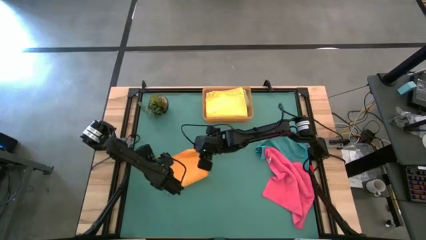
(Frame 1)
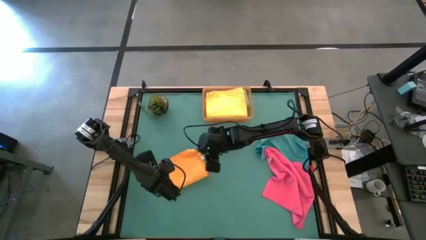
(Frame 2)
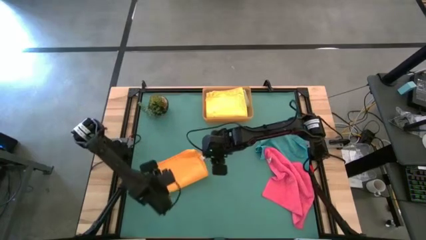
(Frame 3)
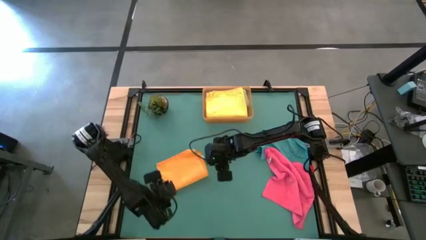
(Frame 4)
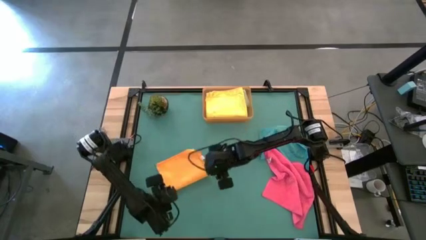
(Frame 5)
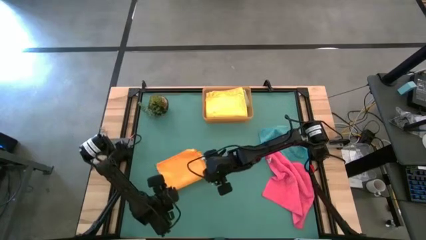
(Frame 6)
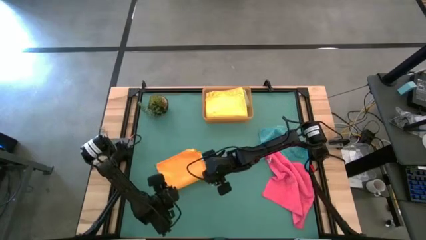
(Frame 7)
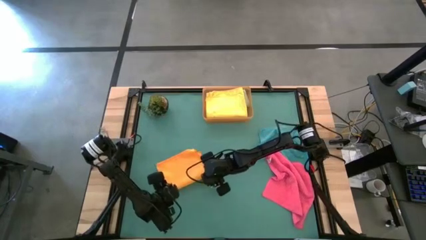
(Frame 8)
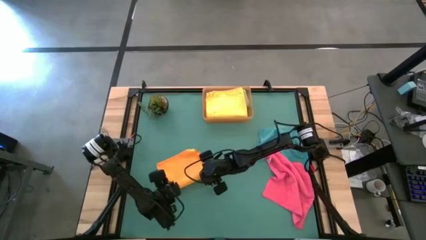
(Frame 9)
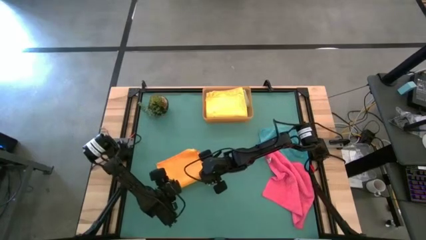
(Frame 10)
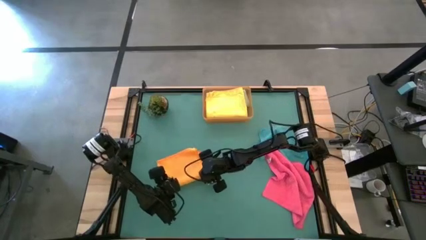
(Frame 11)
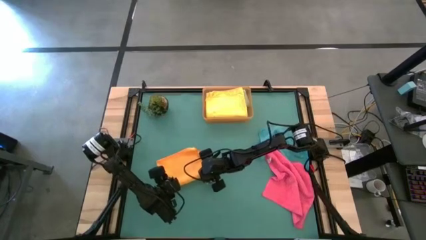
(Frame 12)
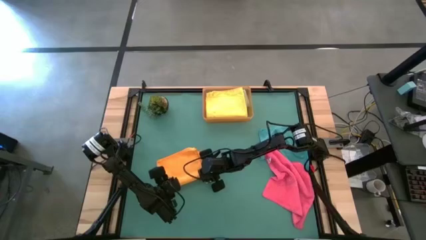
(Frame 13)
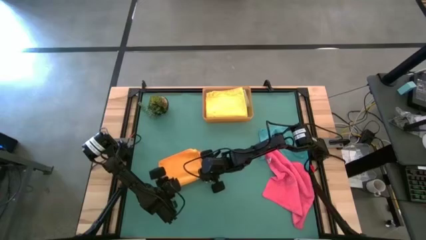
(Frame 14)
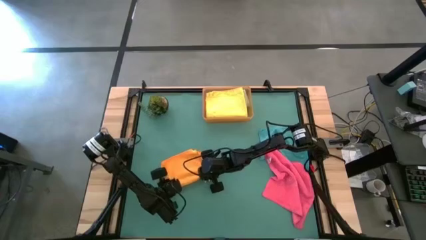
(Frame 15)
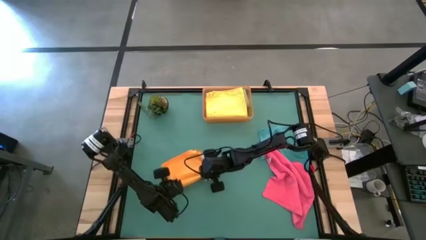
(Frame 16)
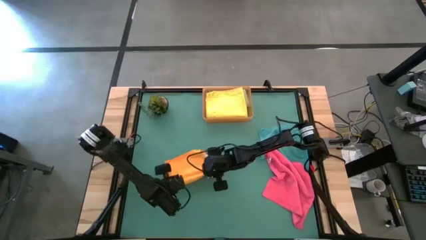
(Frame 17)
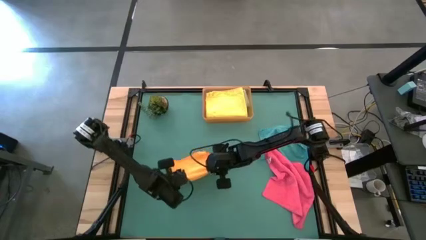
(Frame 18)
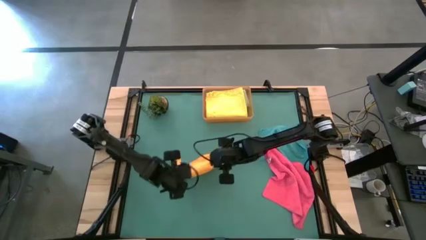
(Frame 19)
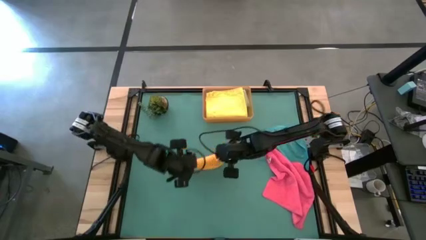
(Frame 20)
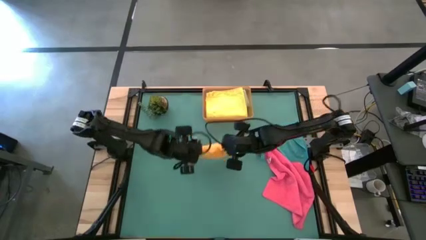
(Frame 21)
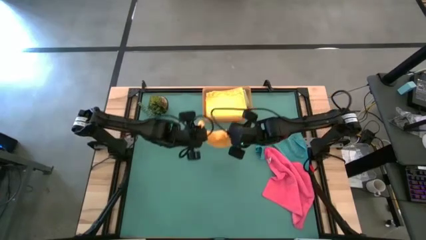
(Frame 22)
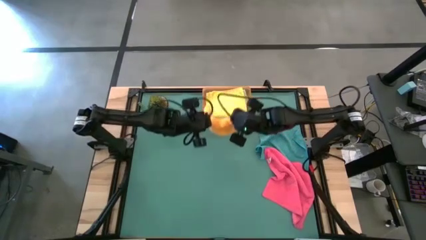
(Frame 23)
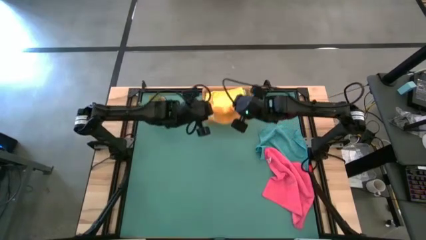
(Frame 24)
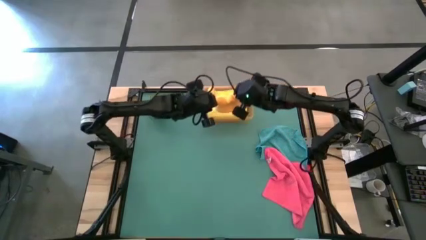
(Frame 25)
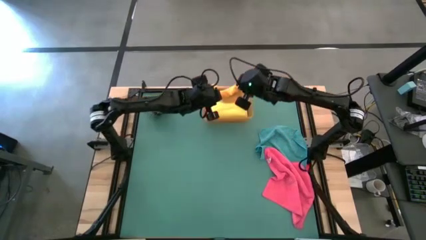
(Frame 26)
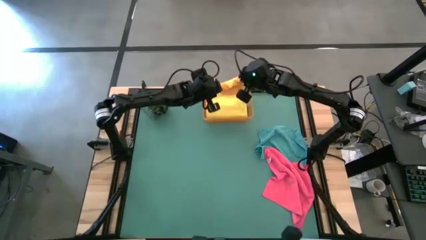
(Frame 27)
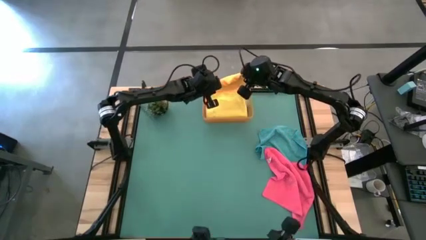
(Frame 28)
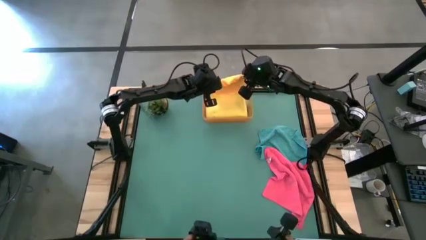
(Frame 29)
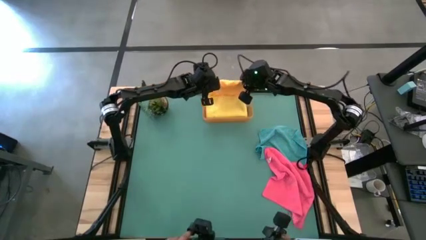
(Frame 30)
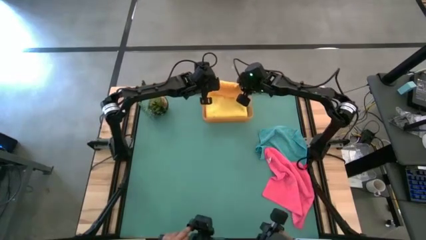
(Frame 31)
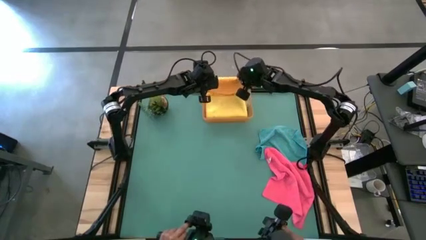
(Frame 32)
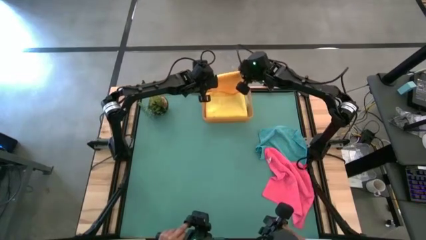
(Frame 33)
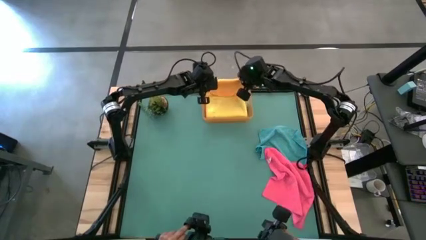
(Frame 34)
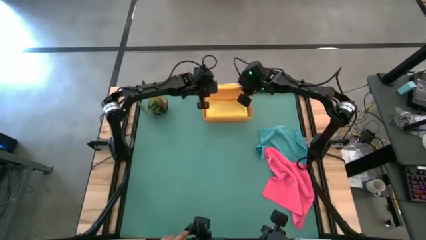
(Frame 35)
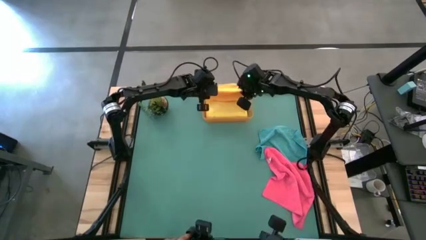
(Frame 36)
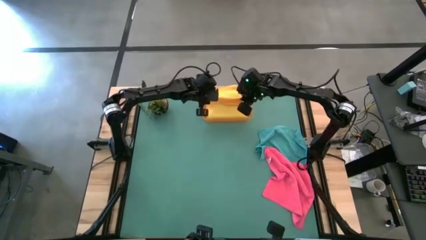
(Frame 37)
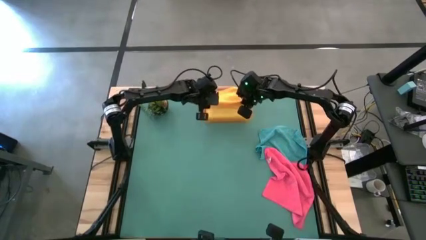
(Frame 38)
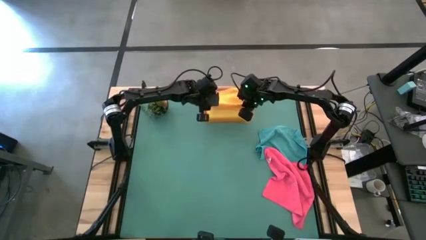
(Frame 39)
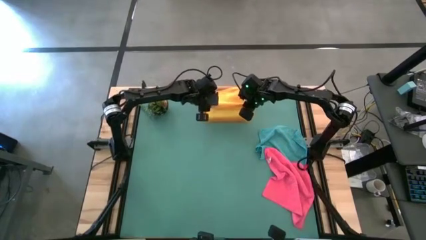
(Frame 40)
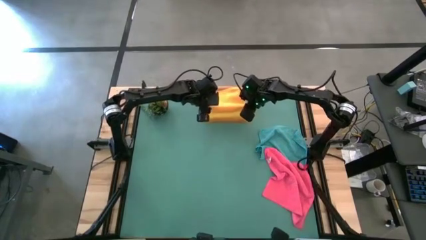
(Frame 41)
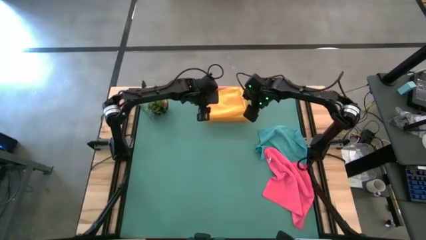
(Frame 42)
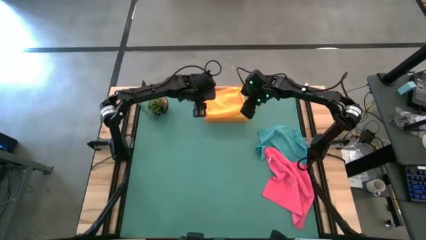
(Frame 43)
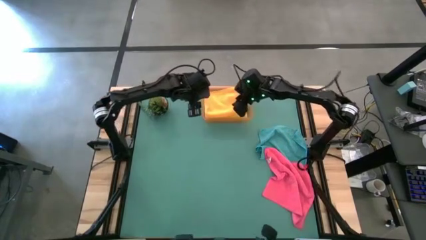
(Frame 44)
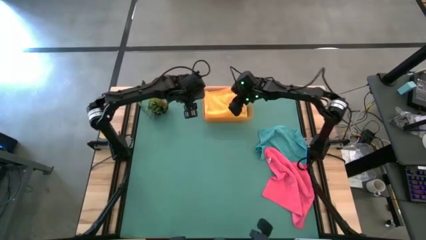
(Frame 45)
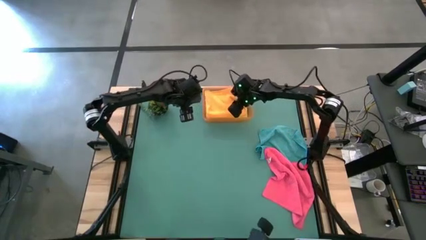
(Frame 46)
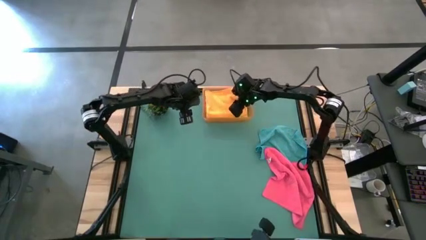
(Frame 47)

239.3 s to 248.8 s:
Task: Fold microfiber towels
Put the folded orange towel into the orange bin

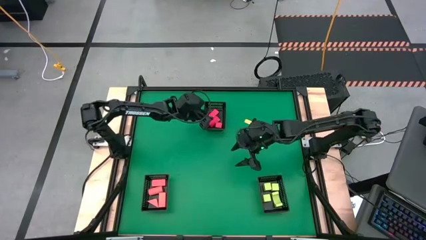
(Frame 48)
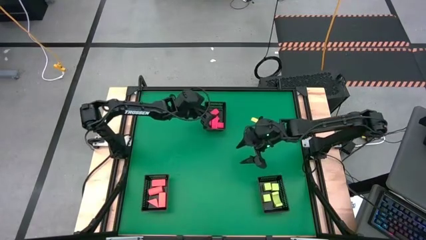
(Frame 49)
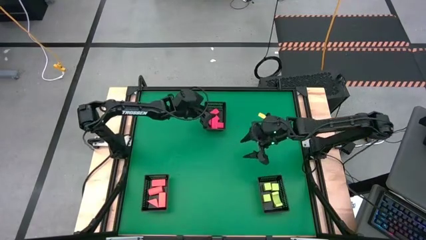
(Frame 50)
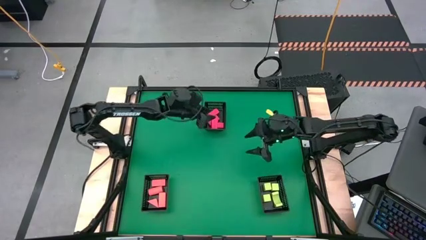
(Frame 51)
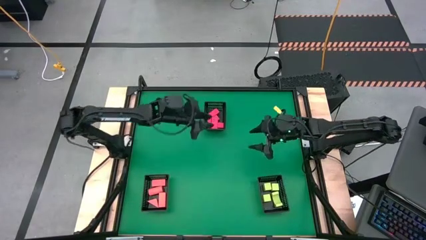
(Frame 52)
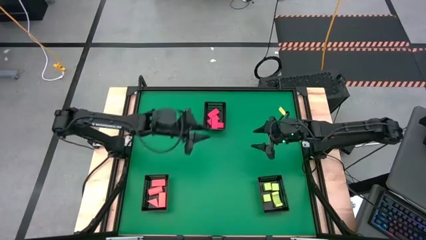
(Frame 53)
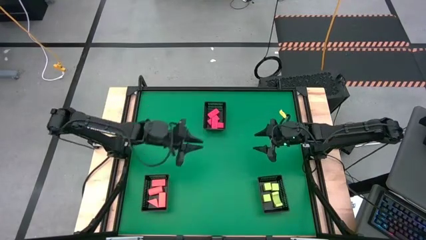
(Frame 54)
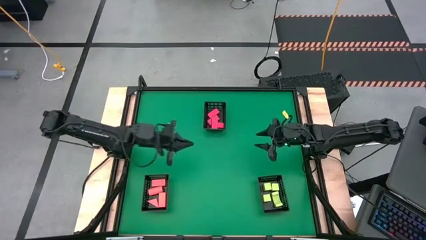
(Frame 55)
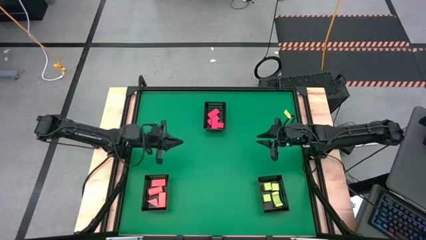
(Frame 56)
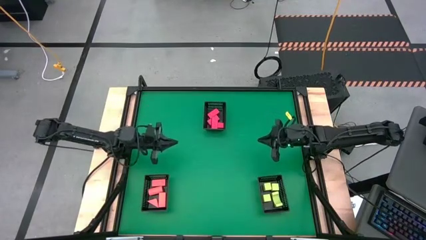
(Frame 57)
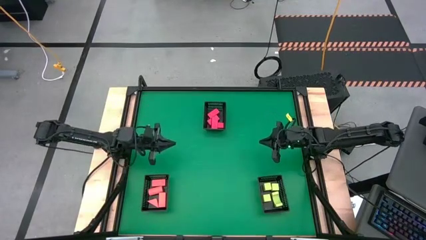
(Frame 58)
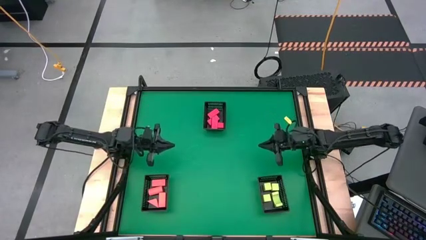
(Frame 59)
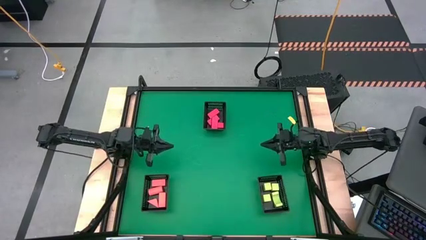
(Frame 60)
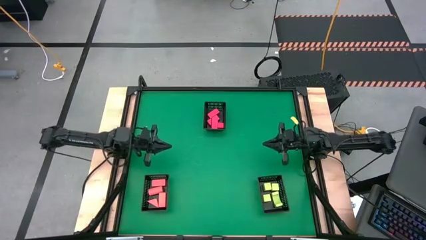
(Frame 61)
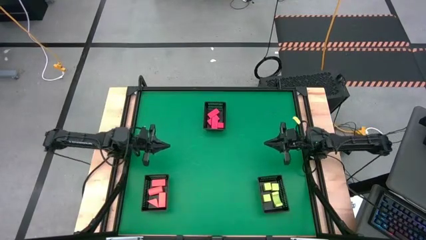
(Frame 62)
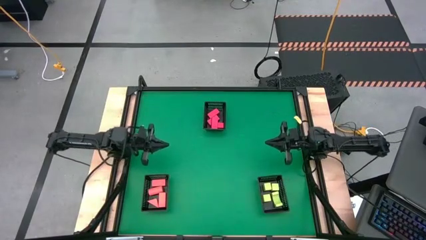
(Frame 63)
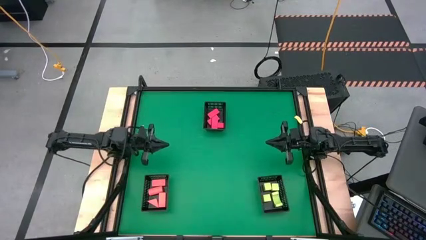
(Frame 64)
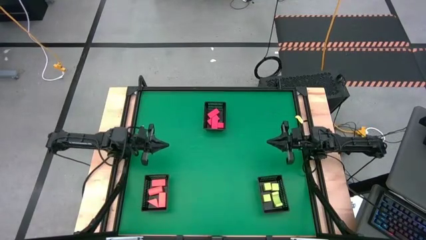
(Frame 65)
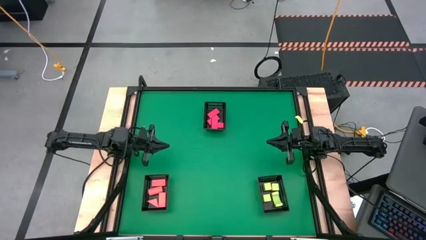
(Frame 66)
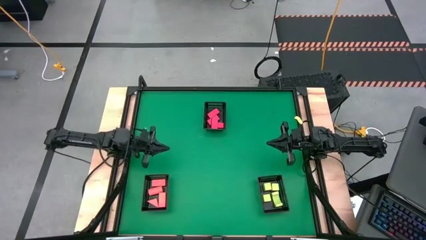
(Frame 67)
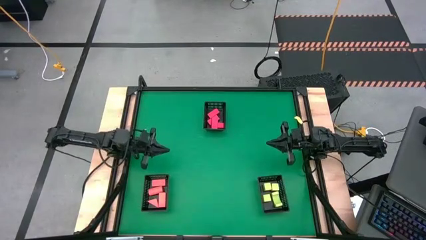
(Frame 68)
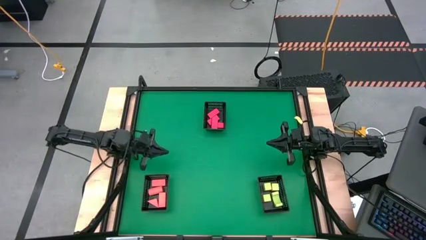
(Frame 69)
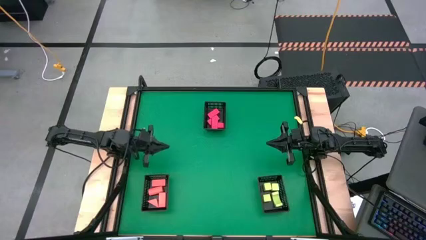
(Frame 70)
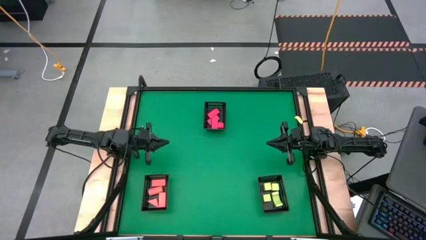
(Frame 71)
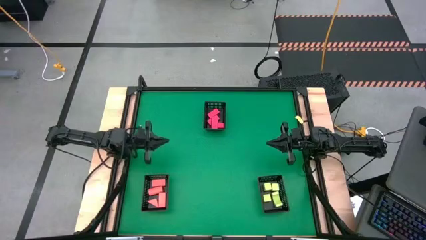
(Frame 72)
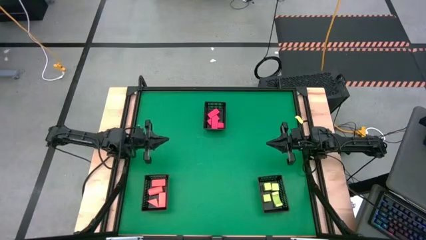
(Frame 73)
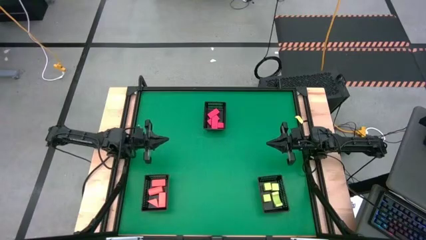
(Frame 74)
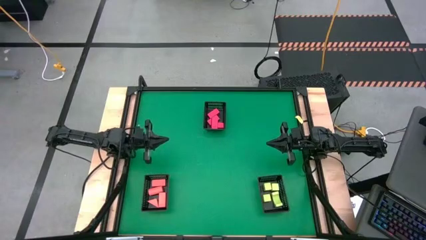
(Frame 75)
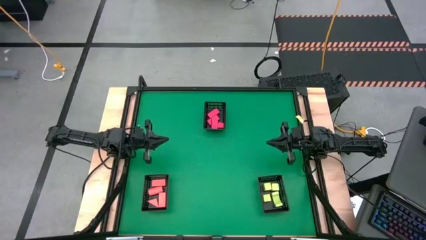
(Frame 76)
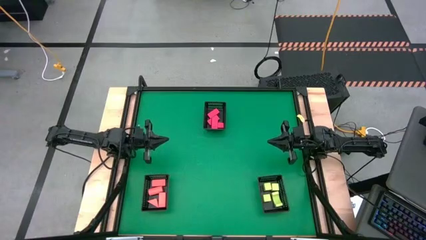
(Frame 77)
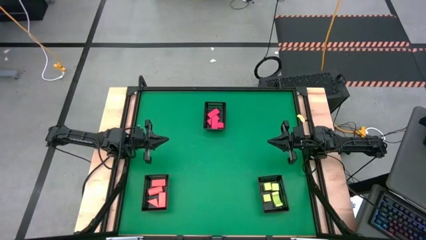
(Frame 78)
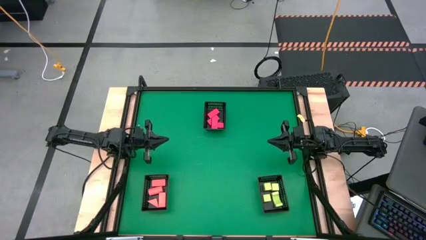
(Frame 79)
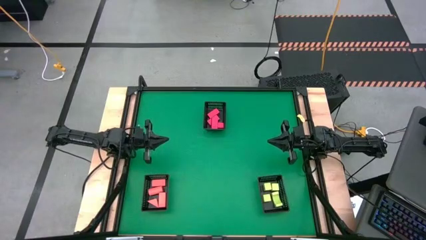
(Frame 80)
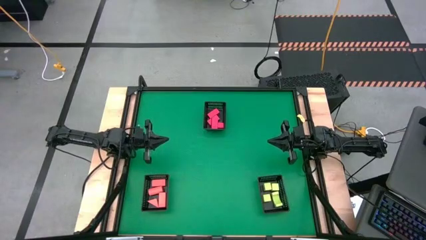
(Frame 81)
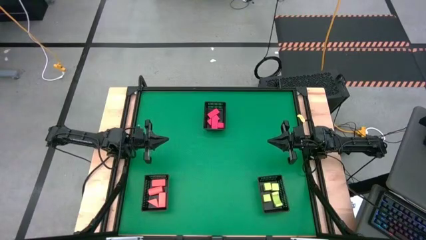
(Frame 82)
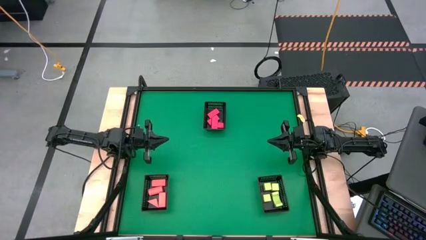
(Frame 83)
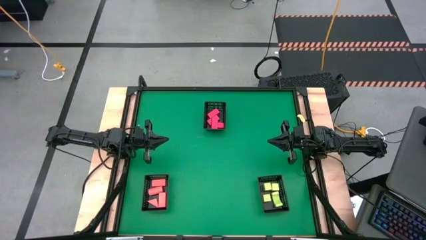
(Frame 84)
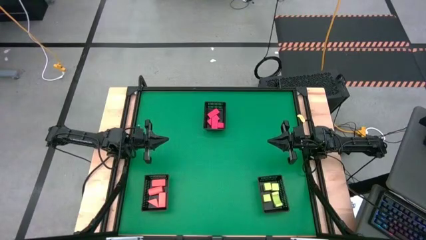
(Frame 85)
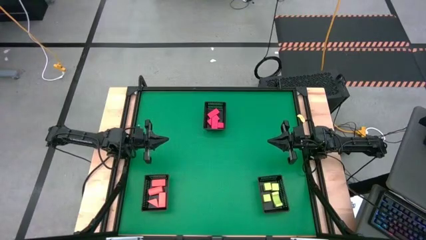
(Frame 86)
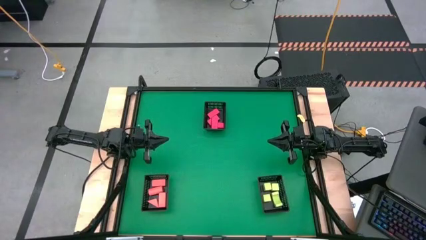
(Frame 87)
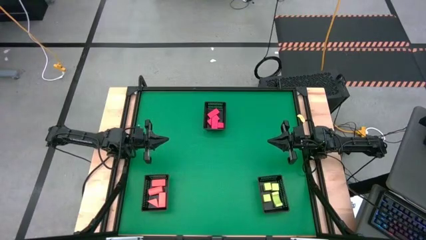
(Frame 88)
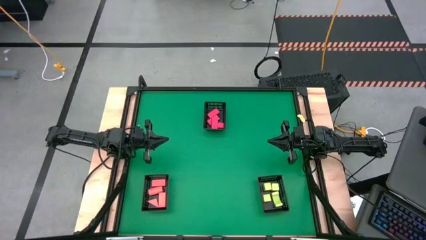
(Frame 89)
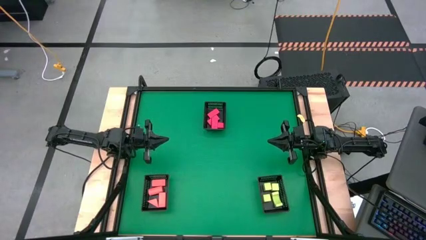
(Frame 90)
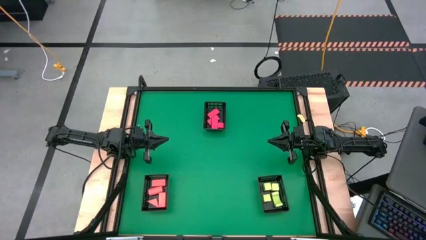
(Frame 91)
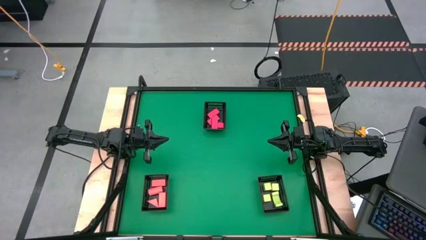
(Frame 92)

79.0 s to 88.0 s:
Task: Sort & place blocks by color
Return to Home Position
